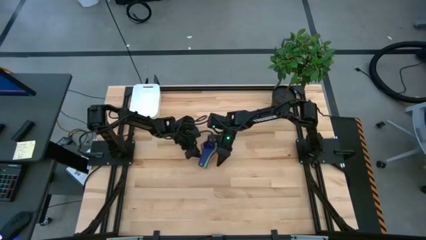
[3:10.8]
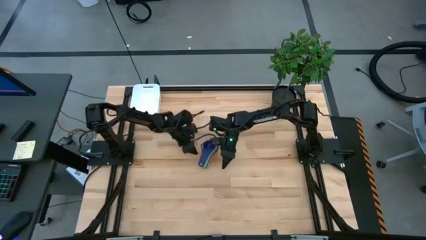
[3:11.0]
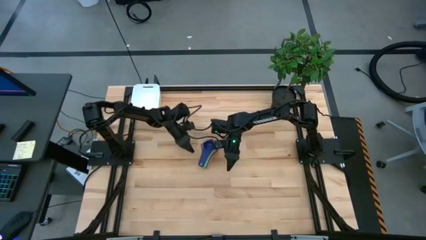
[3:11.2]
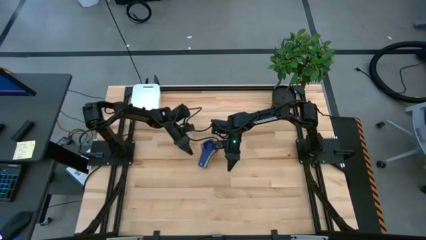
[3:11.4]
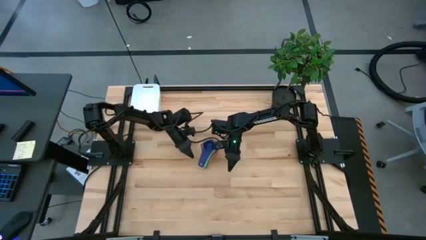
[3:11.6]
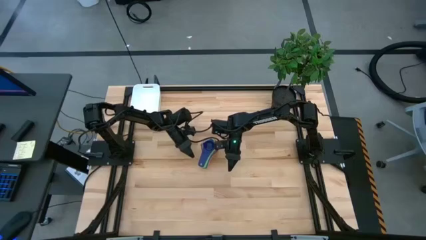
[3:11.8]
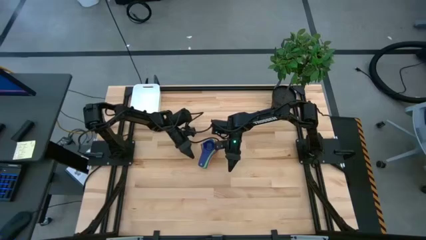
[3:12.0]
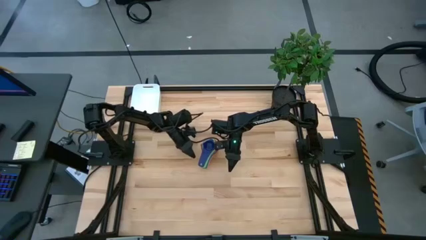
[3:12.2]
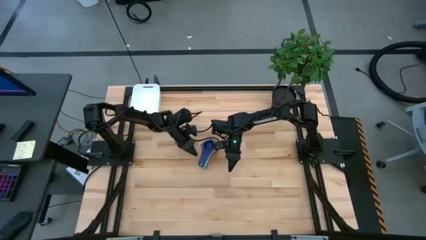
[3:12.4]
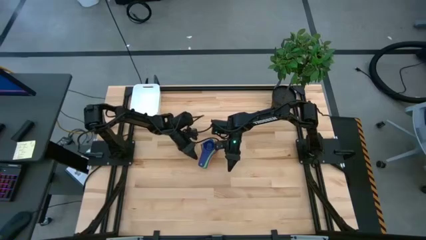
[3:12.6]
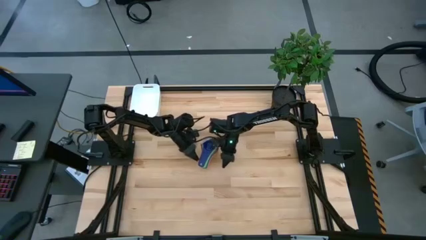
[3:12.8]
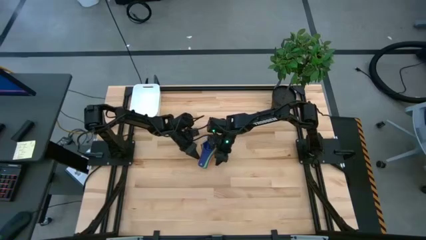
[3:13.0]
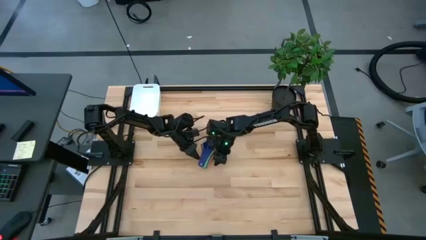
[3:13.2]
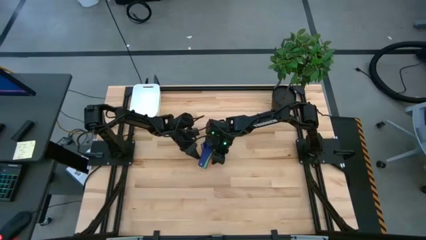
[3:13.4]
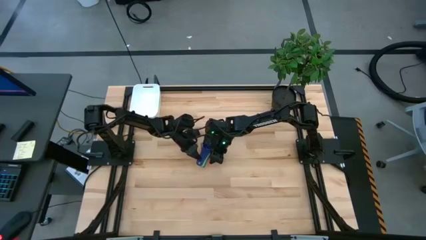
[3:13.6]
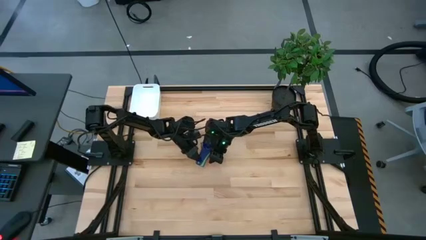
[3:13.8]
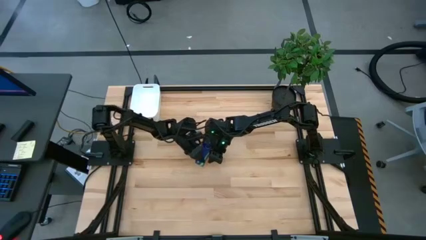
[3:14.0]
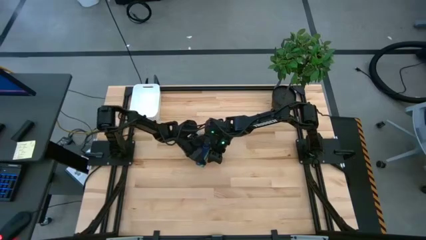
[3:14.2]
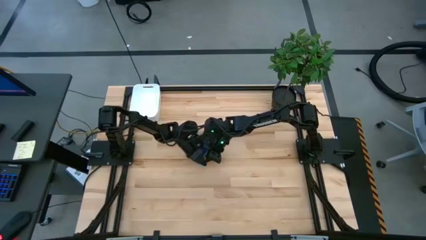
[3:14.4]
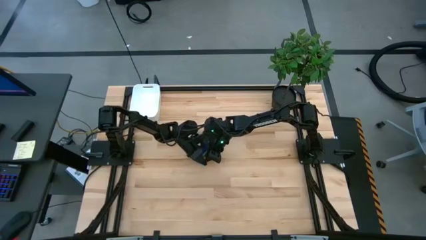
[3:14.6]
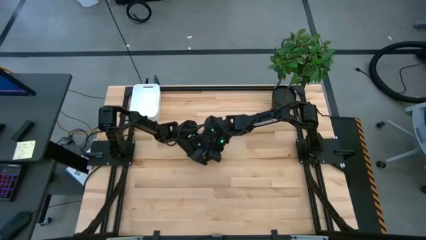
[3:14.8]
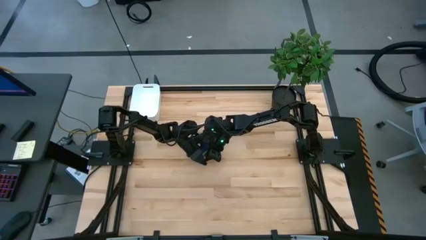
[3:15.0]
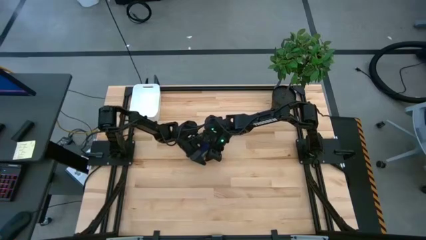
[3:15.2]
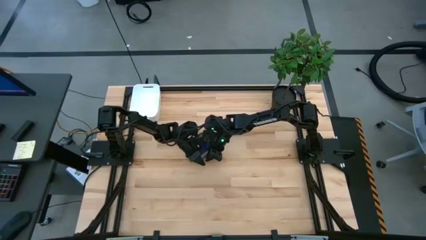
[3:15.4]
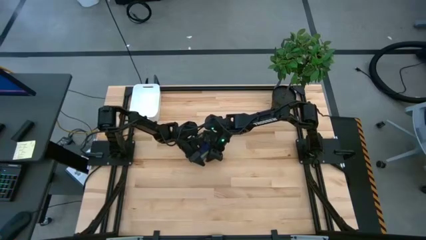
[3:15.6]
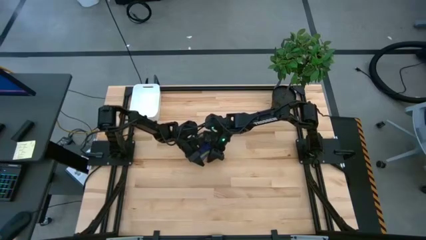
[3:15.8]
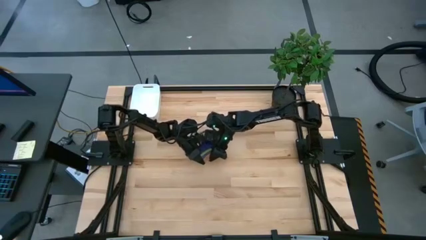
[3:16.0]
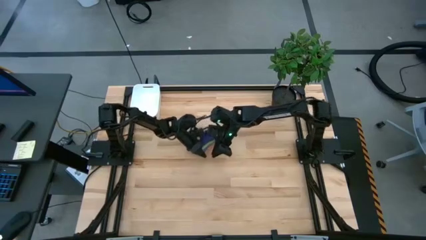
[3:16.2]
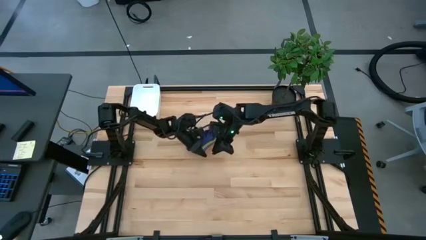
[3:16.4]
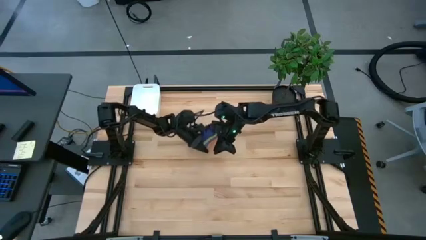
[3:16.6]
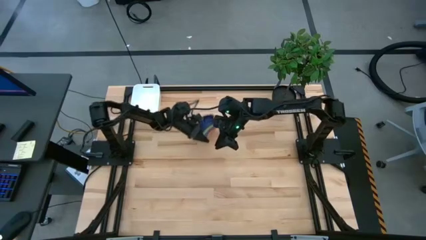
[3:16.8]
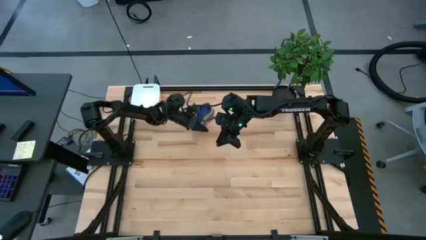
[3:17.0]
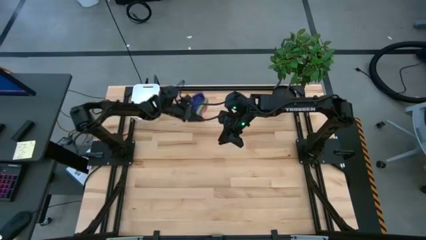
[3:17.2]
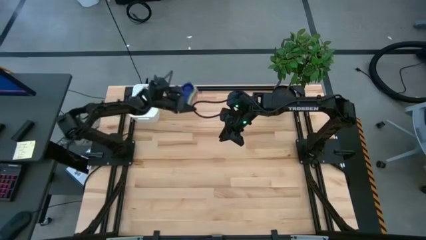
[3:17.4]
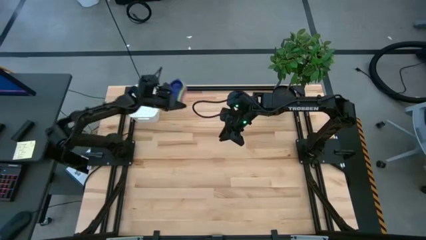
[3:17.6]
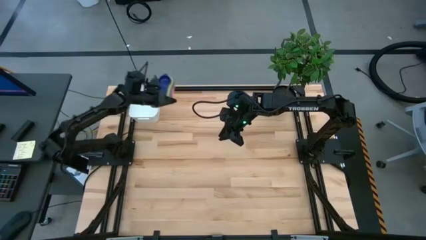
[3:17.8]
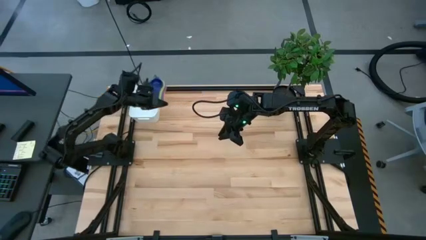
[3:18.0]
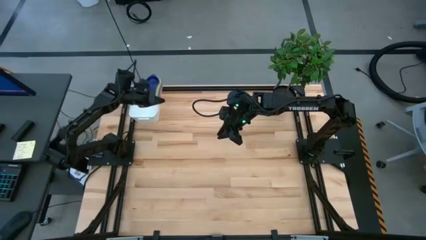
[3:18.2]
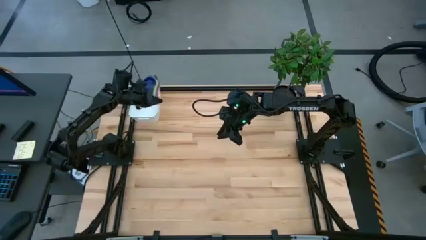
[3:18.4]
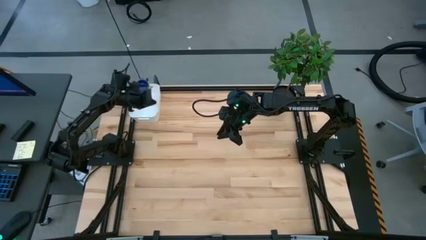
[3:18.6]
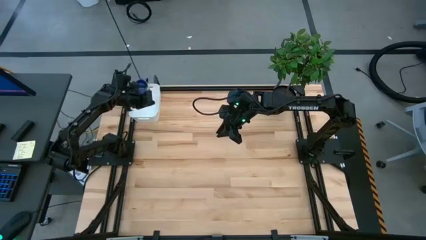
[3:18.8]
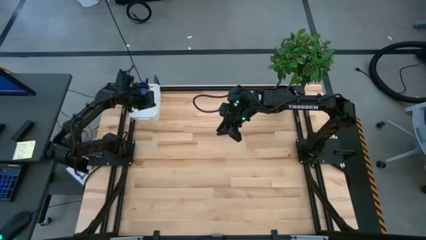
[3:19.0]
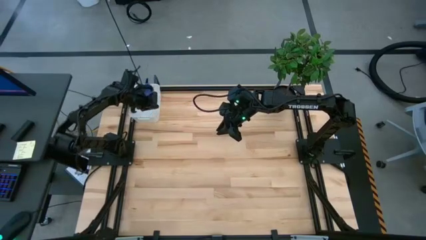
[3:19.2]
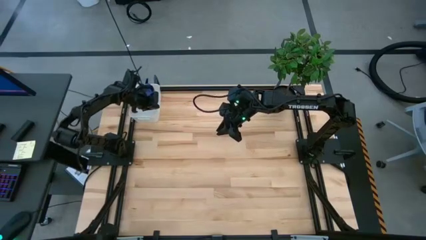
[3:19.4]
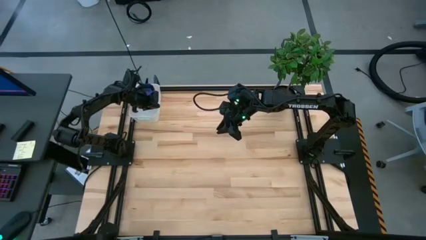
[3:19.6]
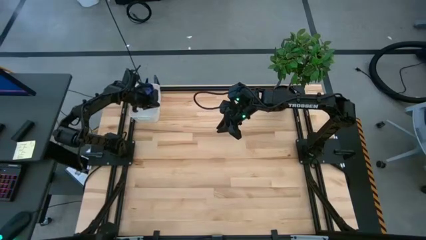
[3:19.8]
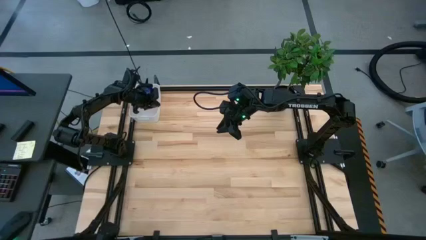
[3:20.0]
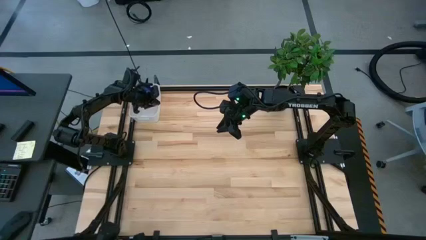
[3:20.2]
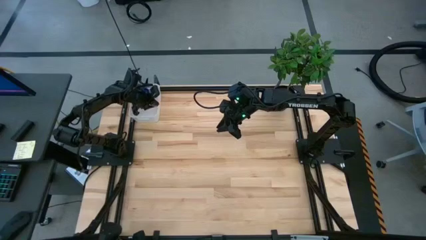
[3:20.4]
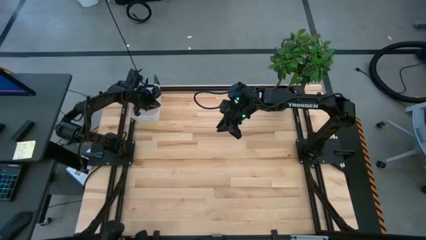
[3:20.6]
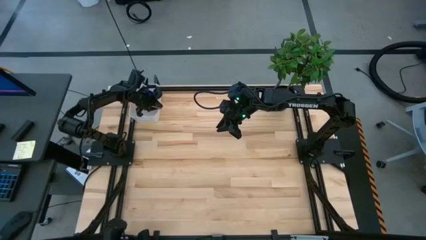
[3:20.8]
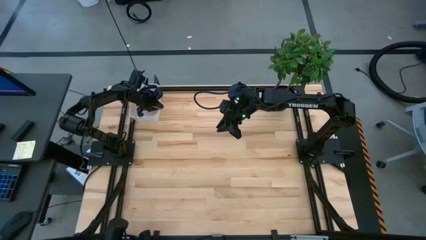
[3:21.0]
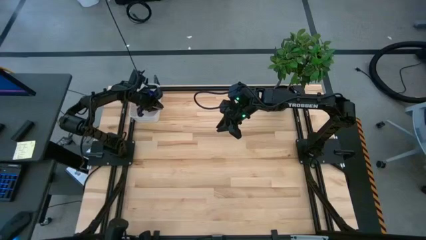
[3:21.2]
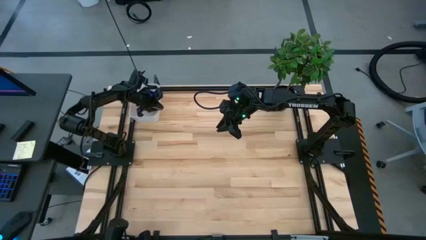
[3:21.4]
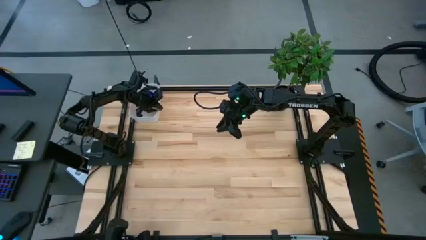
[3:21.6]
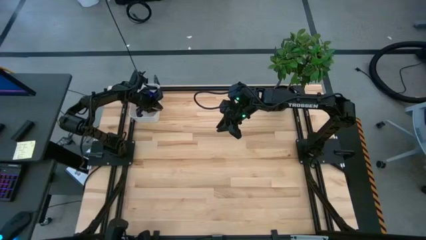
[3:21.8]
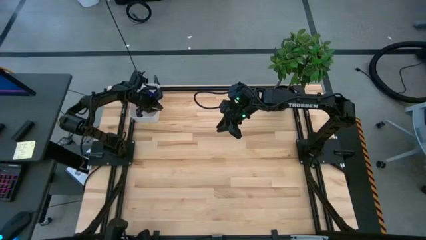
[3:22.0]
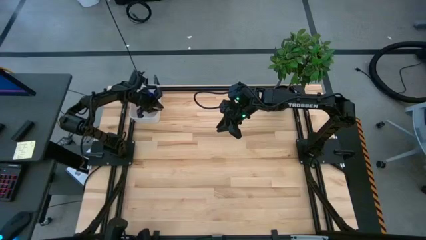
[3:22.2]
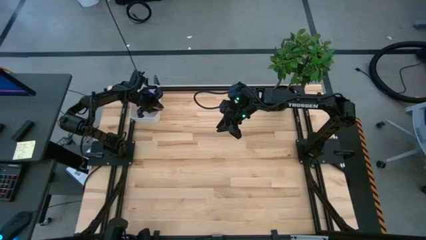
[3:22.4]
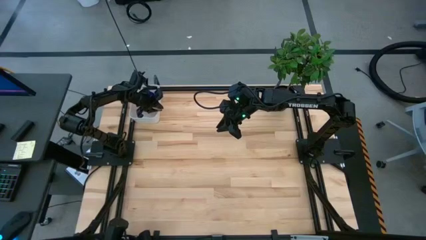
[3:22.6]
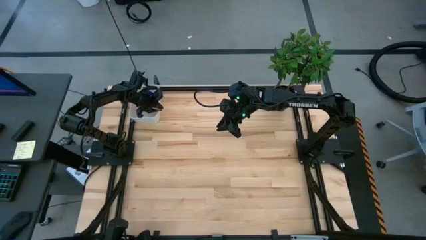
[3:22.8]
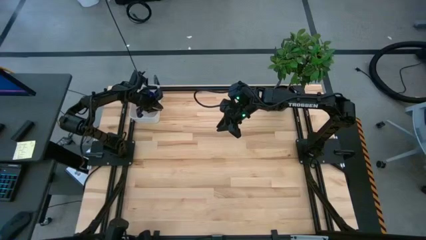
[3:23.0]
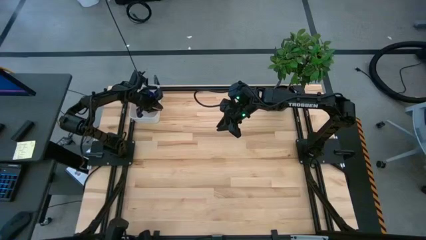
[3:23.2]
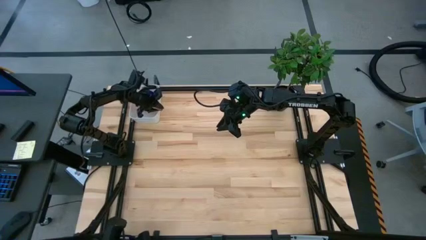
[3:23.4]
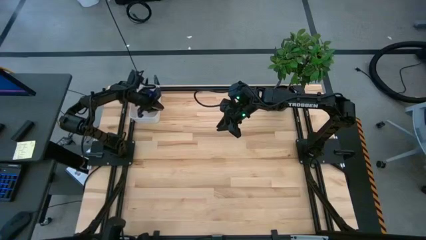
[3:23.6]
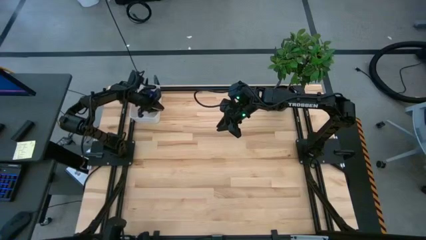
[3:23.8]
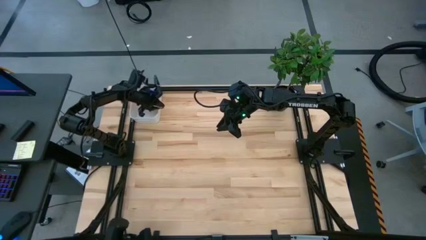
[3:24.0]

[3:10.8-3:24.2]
Task: Nest measuring cups in basket
Put the nested measuring cups into the white bin
